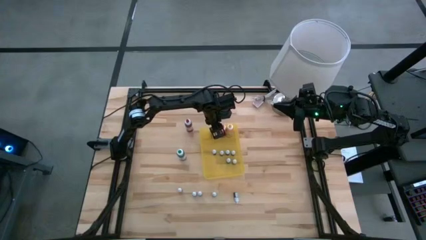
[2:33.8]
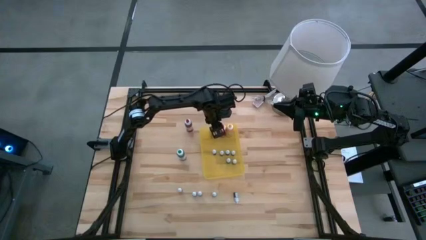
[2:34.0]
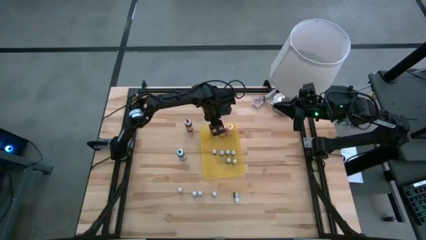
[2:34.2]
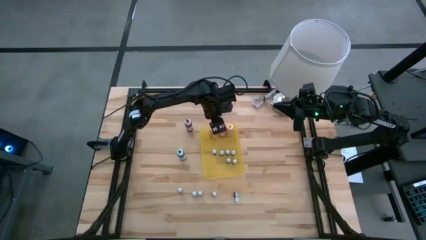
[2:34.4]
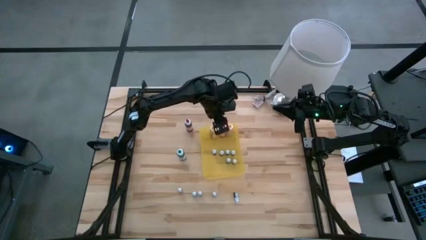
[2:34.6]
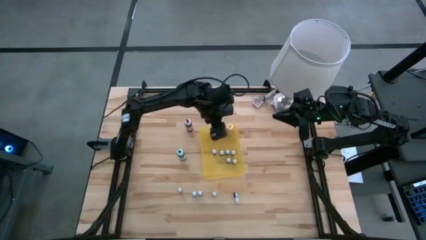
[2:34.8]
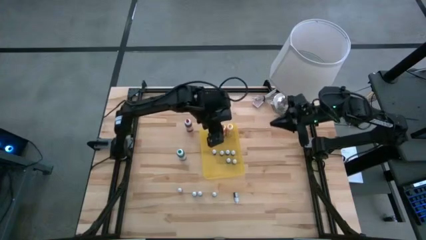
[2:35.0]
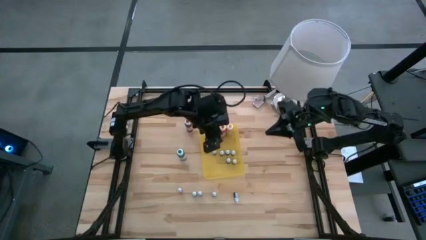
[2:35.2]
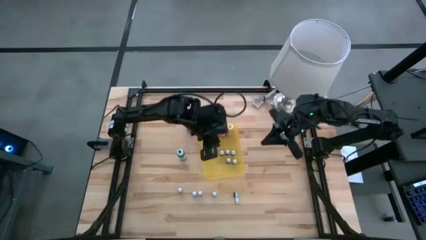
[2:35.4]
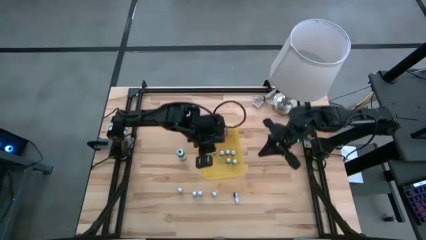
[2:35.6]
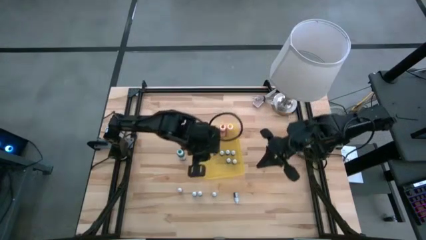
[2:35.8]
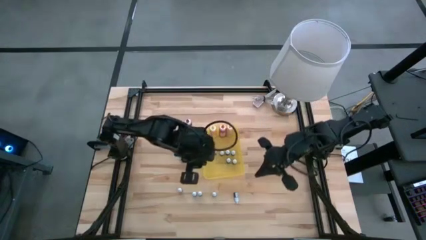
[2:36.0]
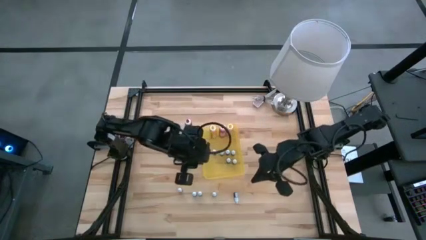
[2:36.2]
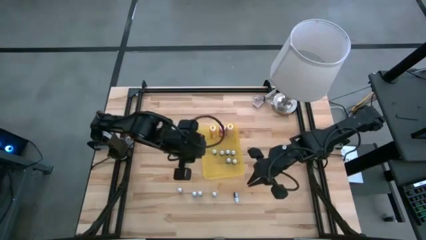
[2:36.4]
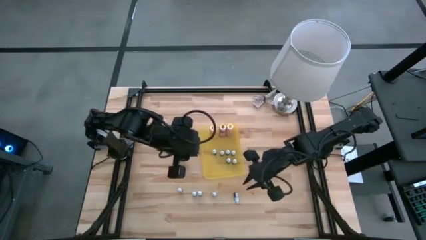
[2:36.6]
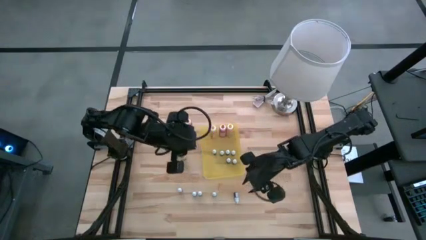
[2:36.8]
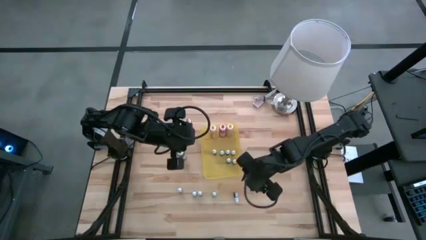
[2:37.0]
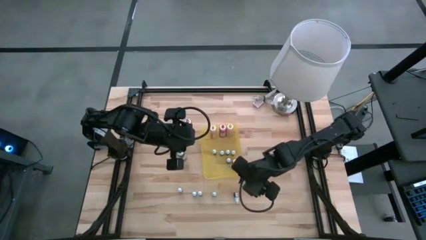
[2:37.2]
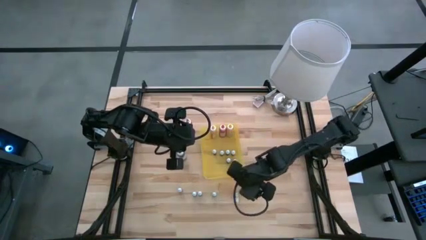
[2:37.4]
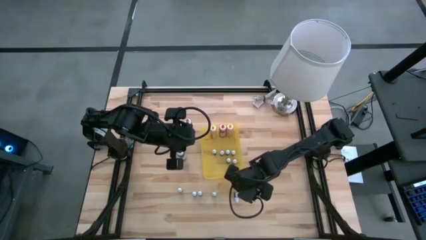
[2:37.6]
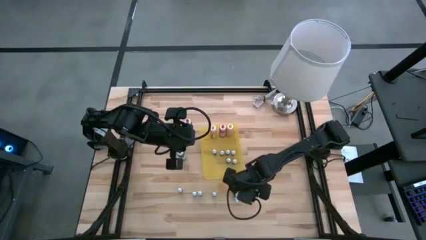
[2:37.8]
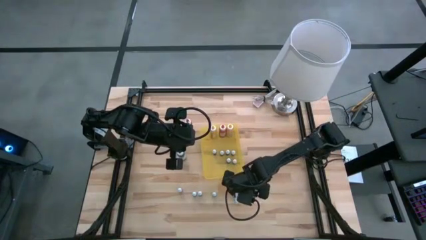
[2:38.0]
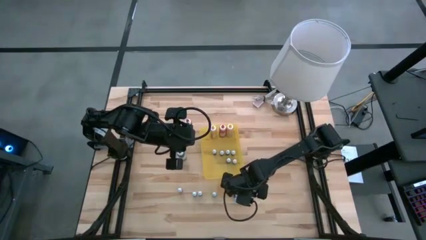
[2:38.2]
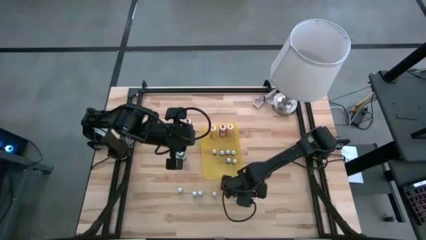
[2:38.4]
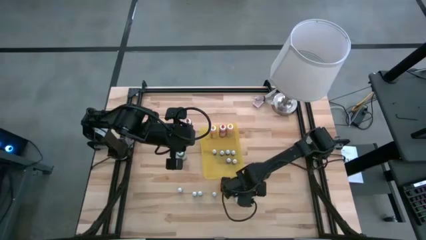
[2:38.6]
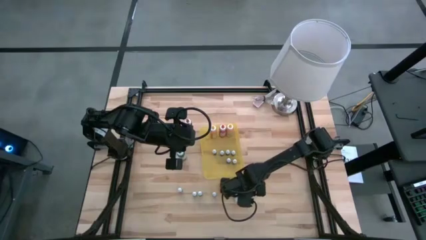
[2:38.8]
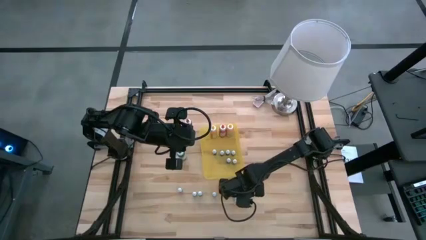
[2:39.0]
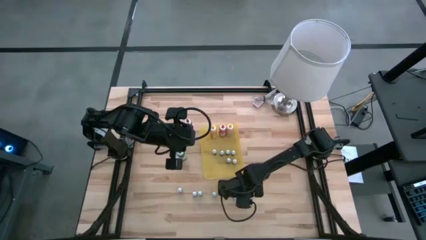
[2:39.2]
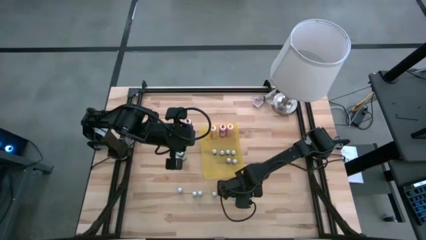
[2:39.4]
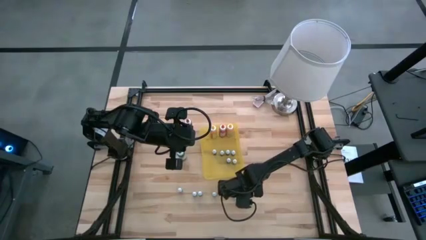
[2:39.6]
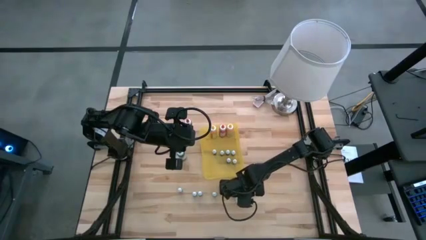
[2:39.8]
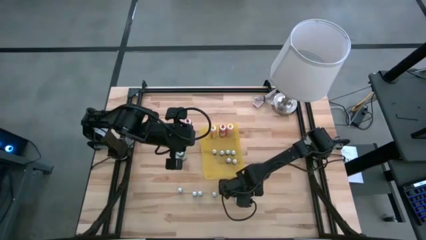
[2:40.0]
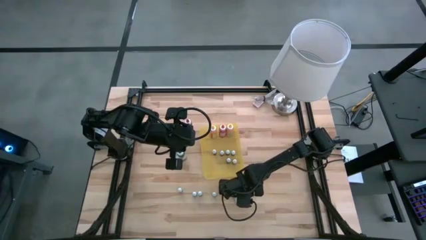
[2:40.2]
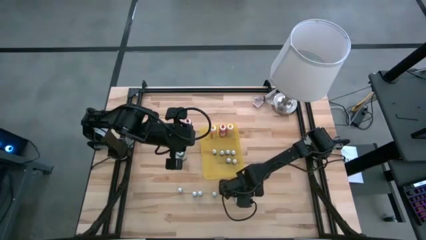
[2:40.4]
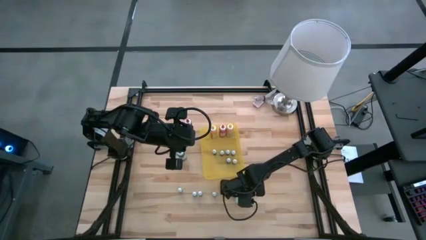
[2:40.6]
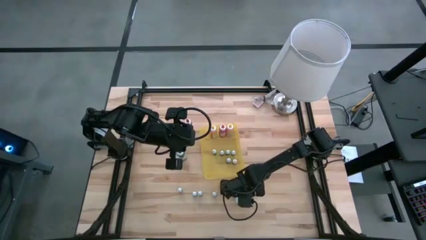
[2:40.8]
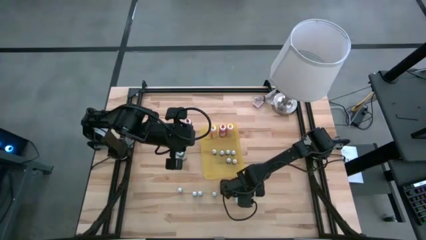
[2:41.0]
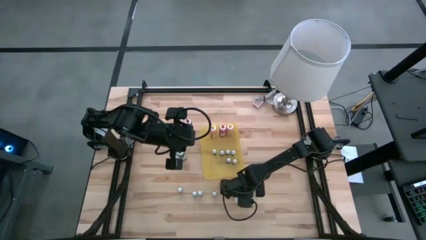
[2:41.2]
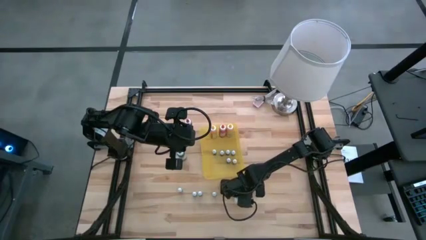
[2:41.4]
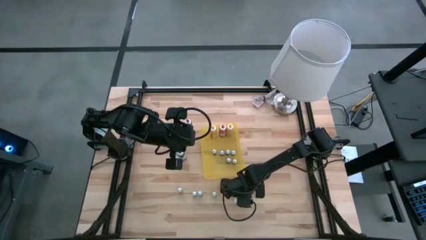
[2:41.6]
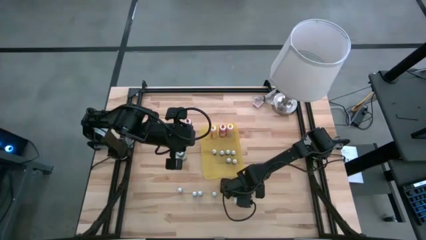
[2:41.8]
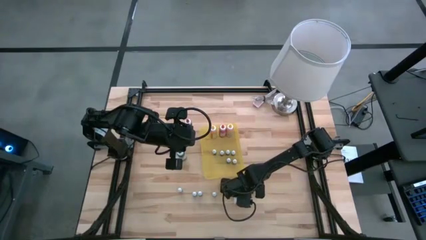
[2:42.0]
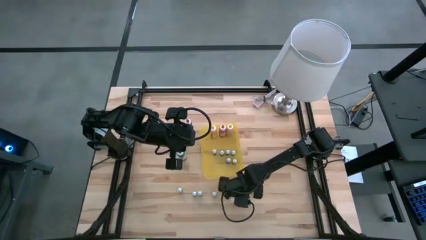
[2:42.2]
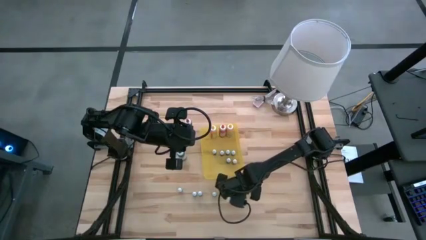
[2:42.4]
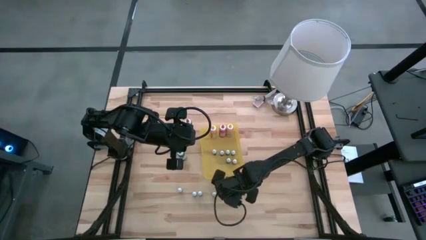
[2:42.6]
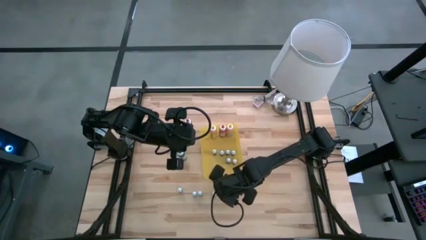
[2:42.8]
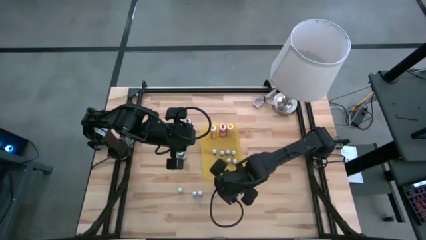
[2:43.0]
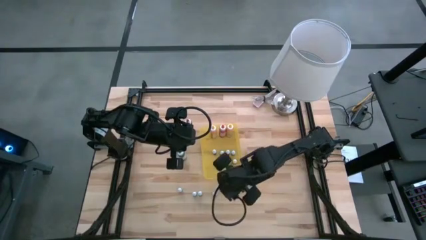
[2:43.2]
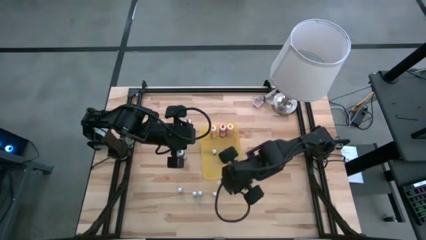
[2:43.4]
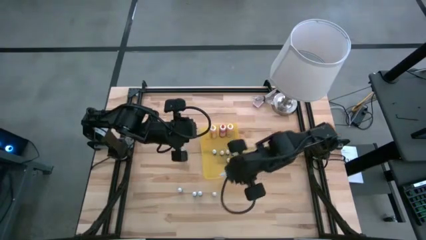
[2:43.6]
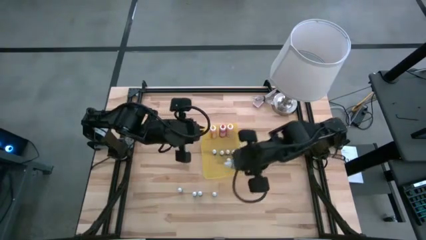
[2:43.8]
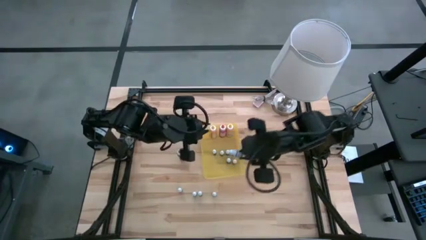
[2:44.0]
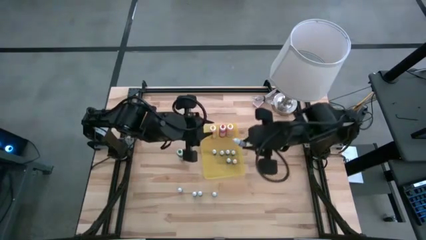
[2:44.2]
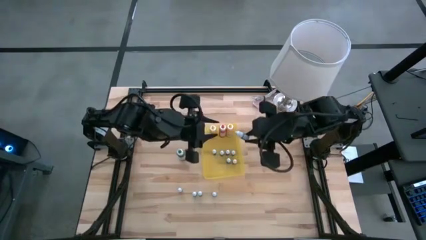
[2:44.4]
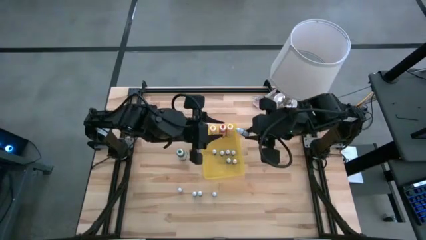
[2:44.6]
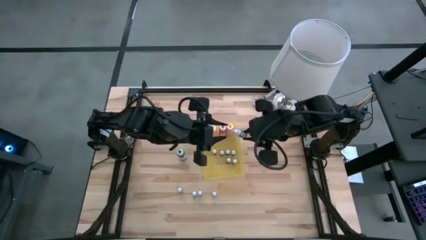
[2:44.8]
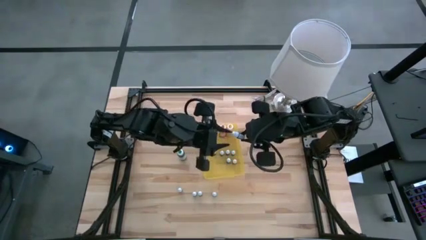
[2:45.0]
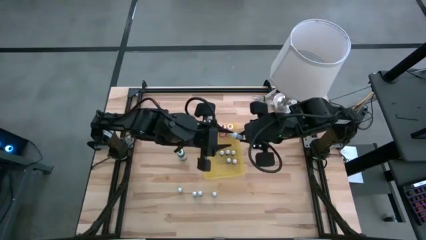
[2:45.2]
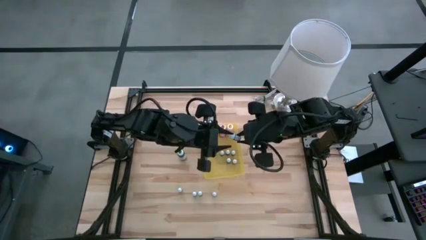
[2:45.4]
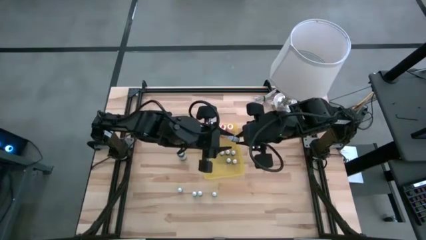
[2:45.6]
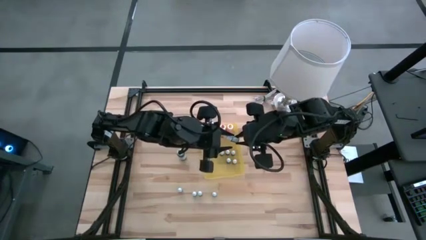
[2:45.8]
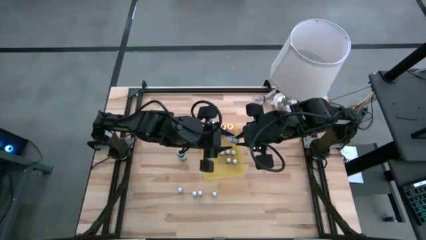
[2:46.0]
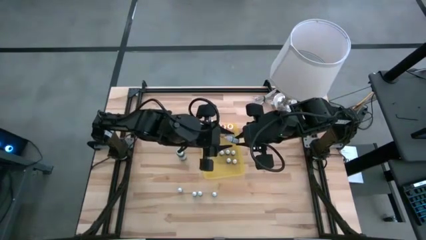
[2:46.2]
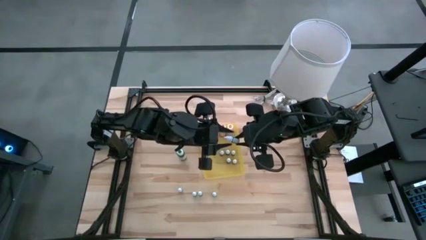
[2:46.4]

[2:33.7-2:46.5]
Task: Pick & Place food coloring
Put the right small black food coloring bottle into the bin

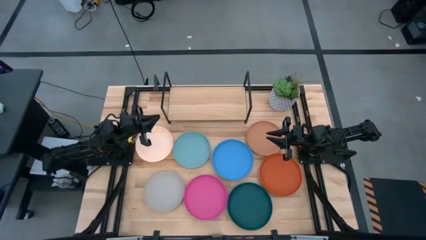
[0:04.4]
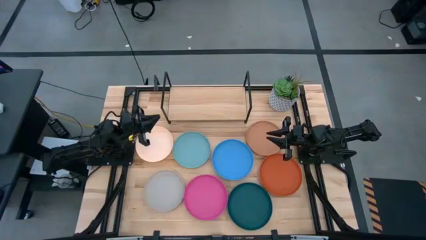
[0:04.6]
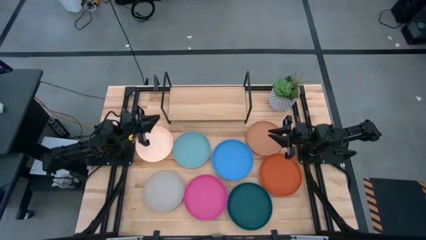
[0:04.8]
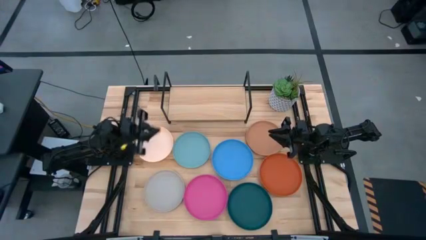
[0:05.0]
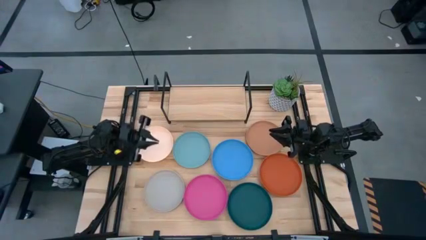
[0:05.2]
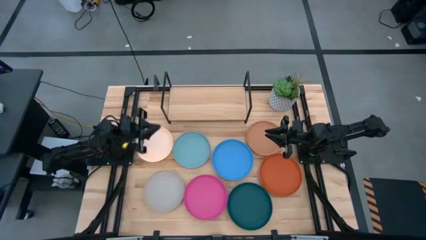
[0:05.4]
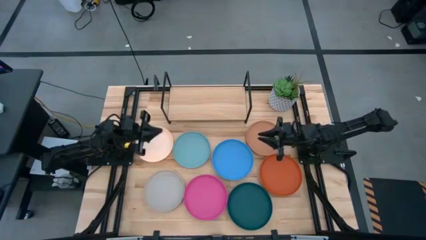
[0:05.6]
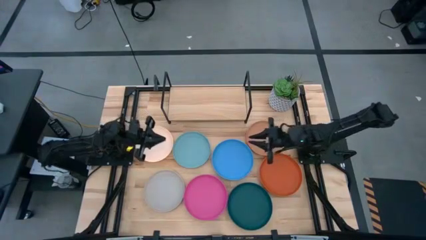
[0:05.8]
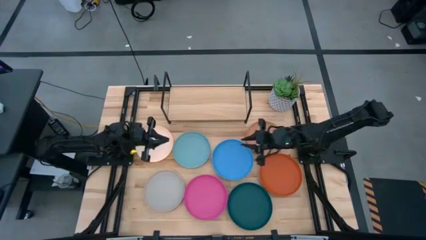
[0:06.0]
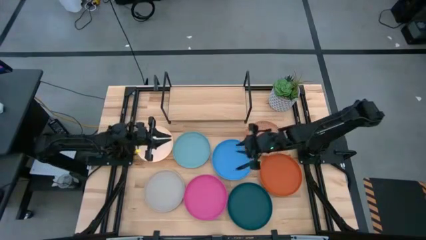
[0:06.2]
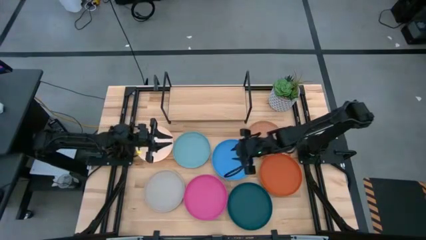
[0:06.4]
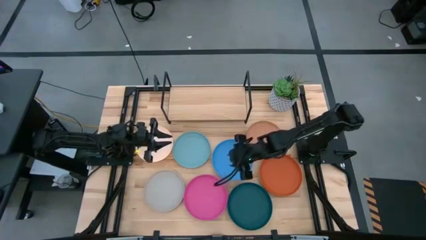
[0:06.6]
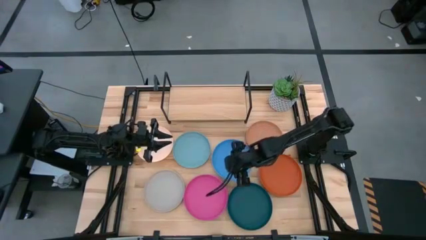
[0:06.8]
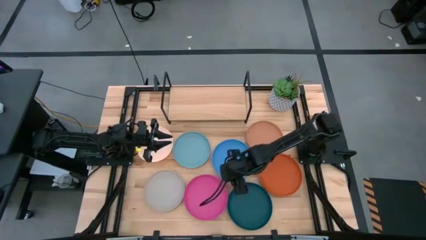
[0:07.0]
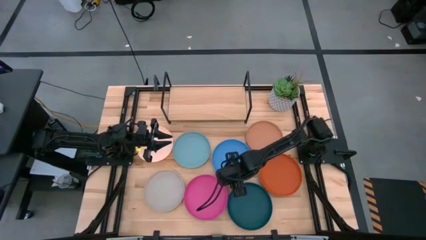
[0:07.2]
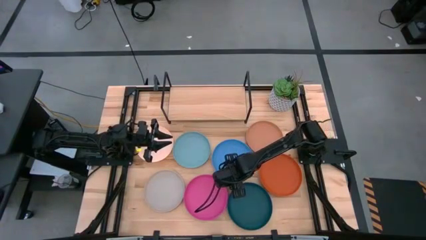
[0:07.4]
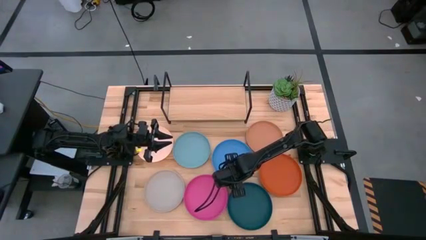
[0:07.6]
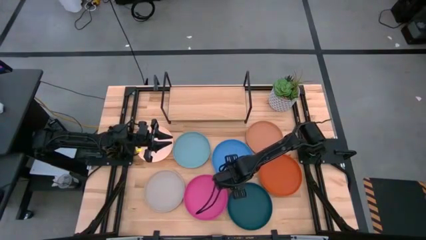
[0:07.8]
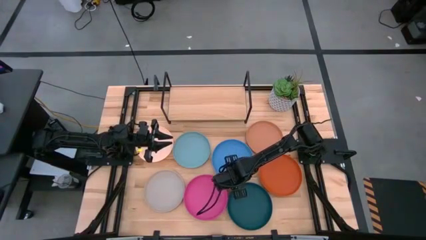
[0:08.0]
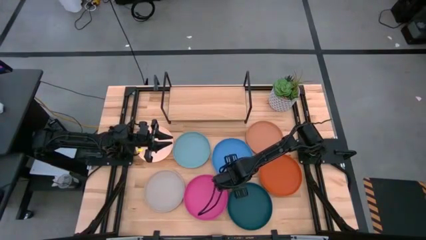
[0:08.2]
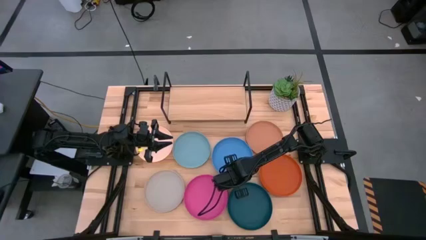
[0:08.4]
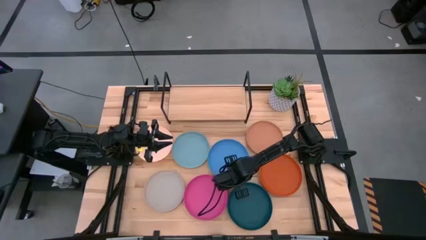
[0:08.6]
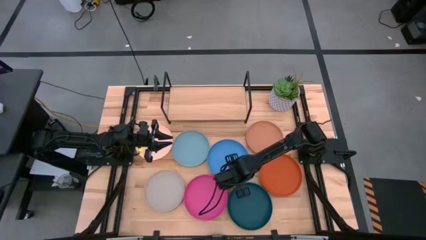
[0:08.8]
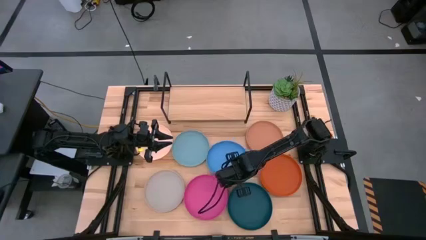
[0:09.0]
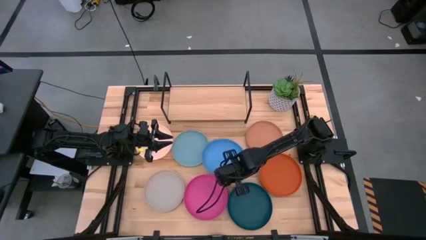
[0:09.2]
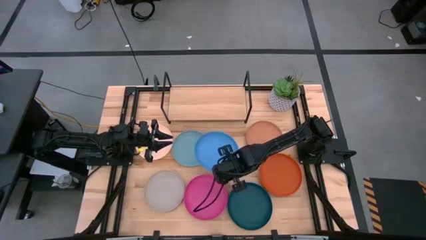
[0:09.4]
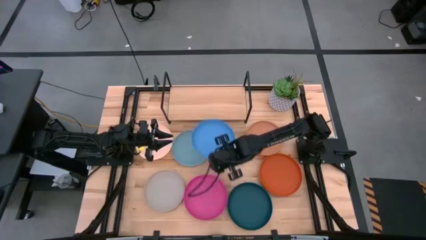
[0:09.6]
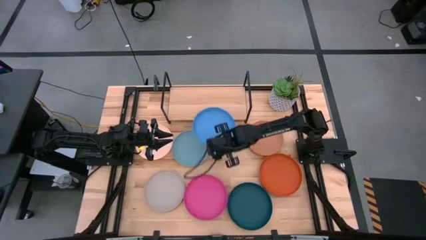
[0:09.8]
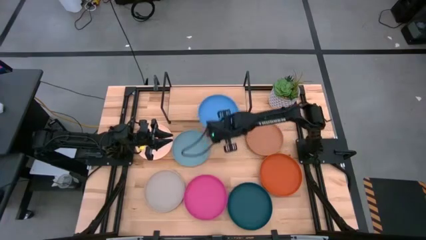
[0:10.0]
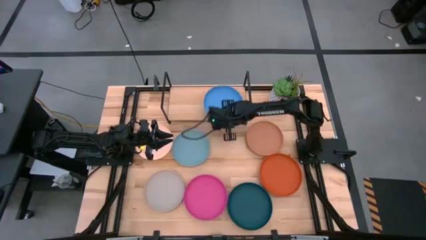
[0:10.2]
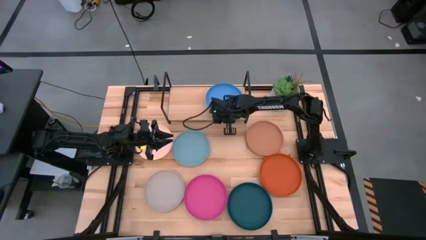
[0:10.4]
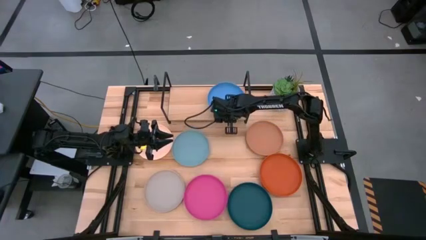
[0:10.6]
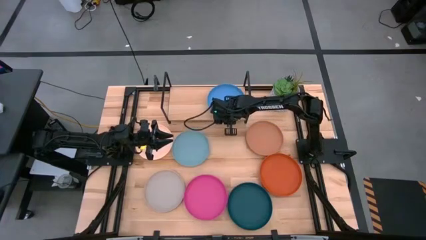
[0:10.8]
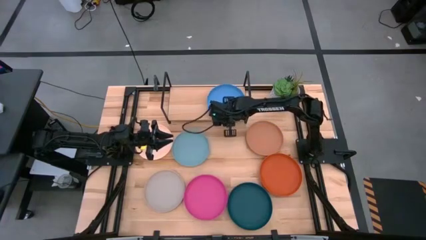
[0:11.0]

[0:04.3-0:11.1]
Task: Place and stack plates onto a shelf
Put the blue plate on the shelf
